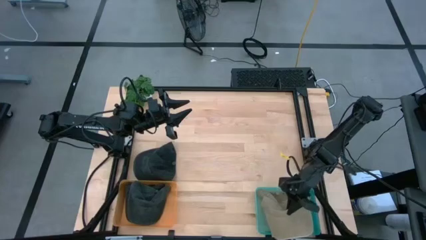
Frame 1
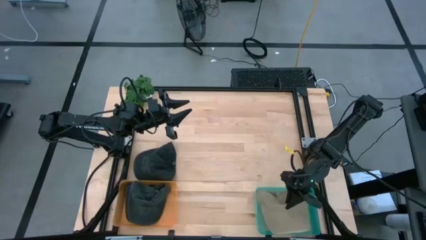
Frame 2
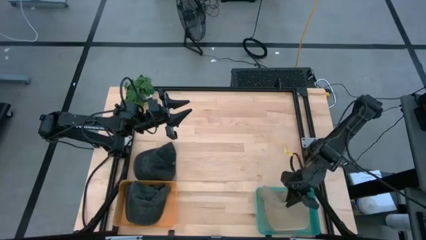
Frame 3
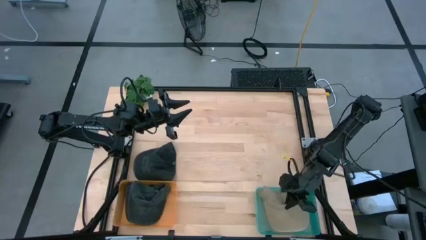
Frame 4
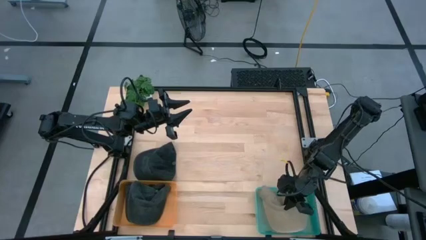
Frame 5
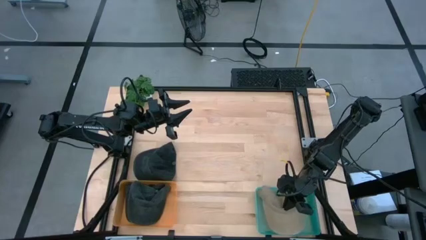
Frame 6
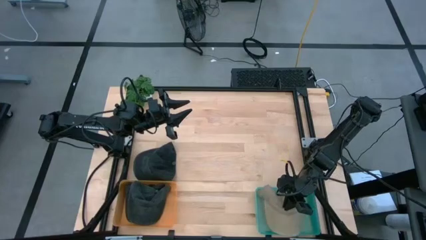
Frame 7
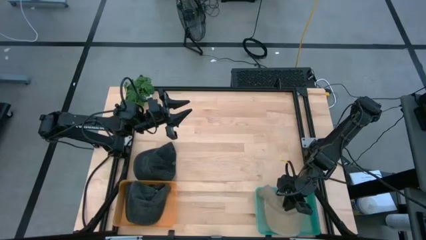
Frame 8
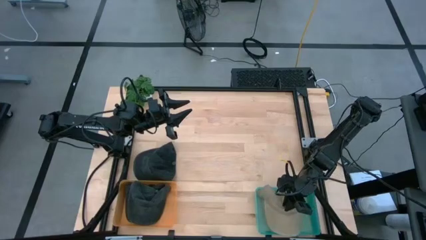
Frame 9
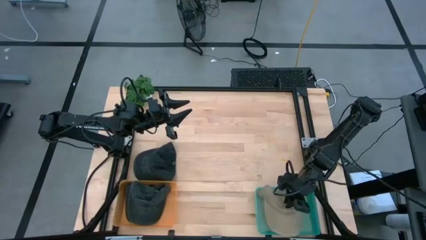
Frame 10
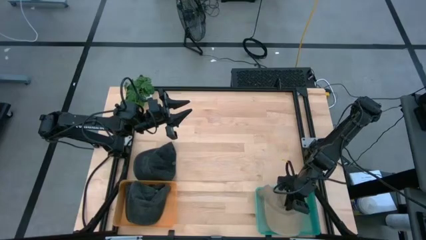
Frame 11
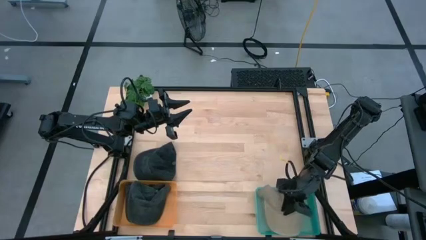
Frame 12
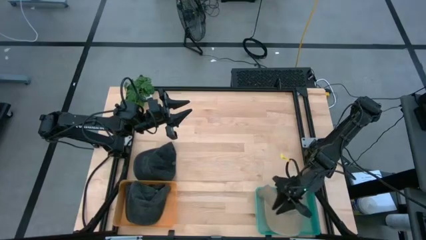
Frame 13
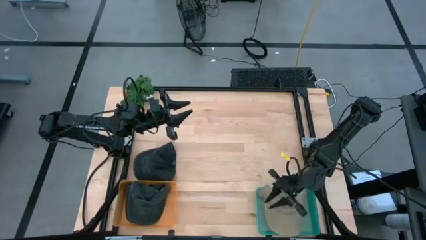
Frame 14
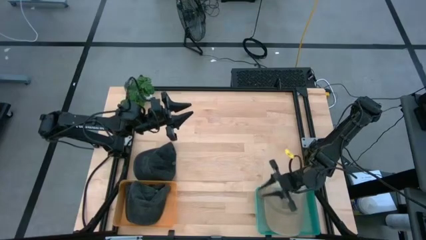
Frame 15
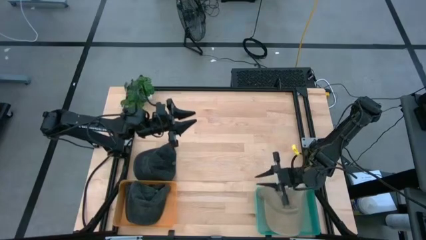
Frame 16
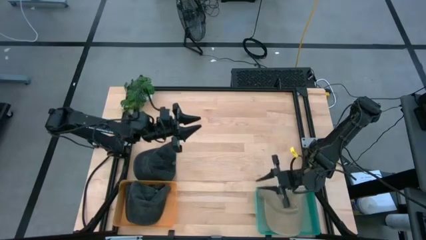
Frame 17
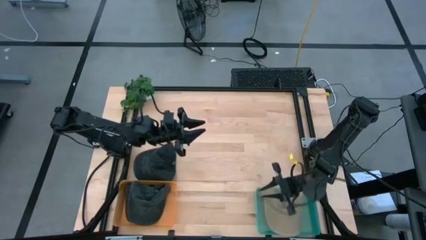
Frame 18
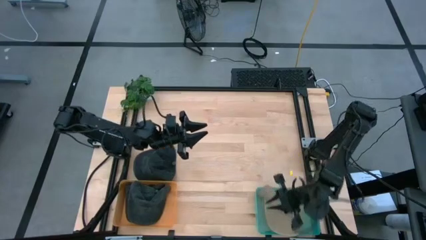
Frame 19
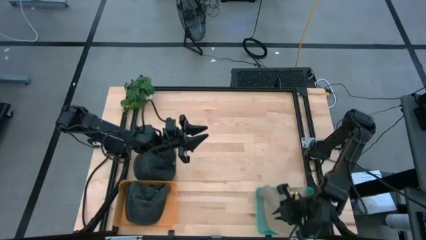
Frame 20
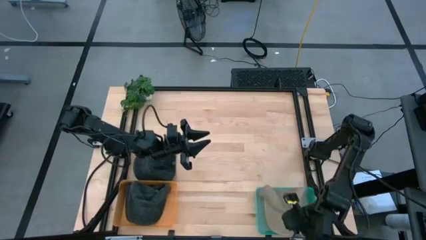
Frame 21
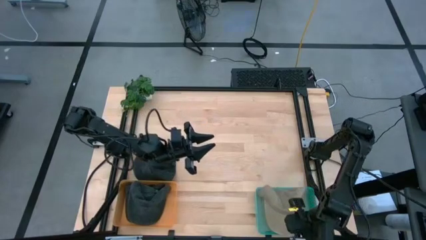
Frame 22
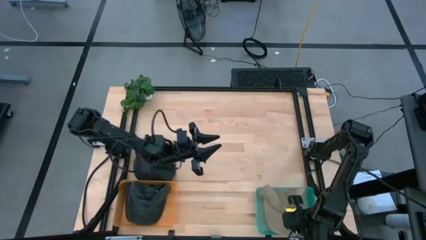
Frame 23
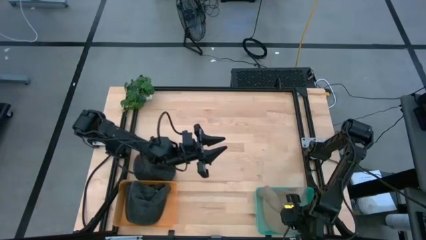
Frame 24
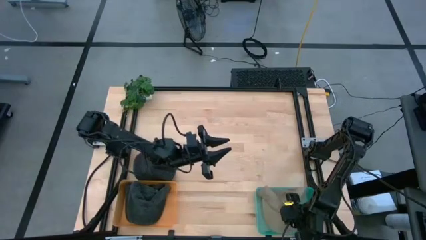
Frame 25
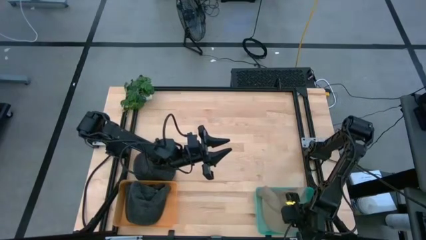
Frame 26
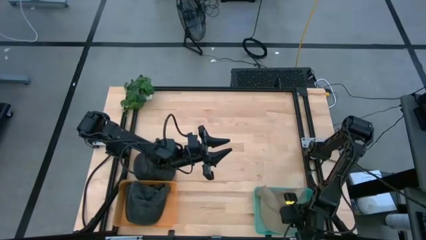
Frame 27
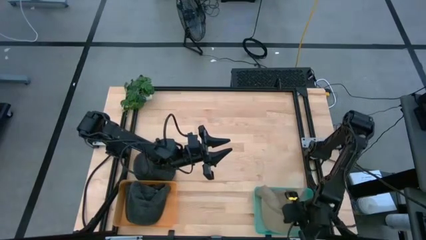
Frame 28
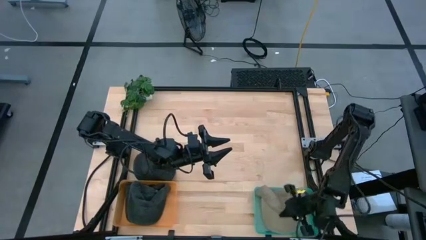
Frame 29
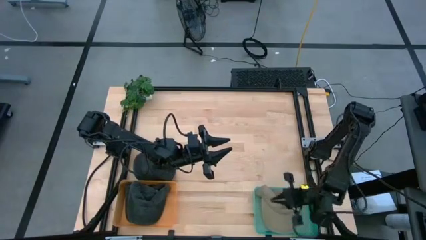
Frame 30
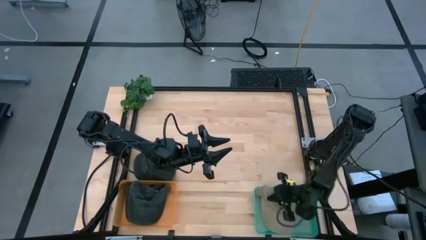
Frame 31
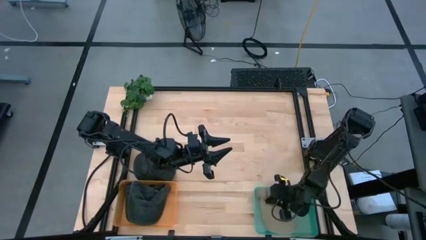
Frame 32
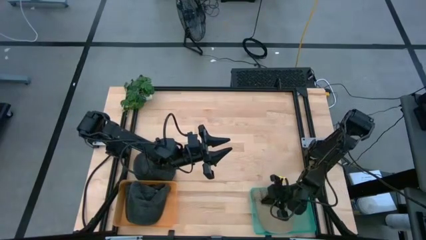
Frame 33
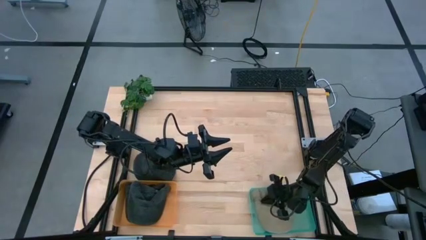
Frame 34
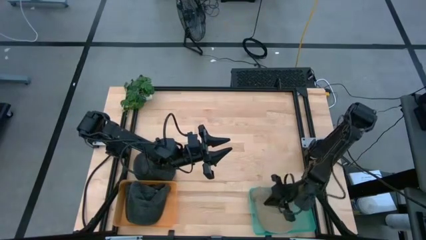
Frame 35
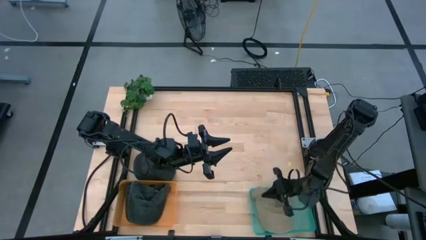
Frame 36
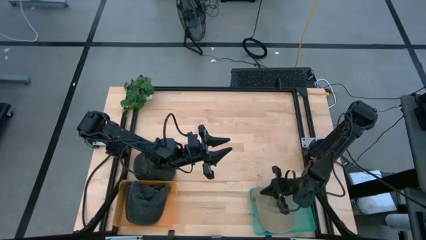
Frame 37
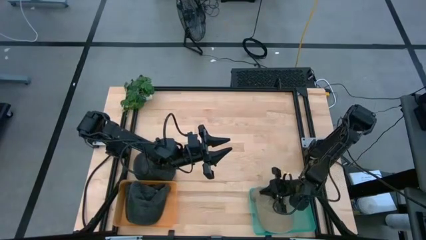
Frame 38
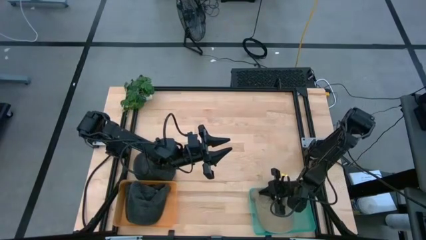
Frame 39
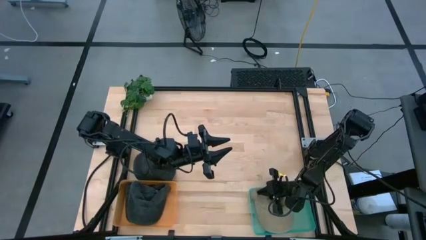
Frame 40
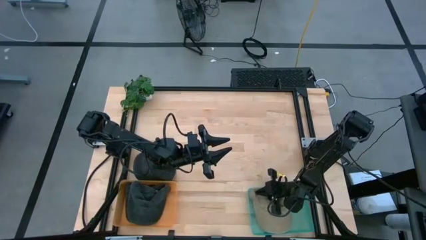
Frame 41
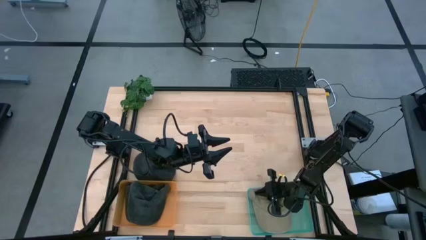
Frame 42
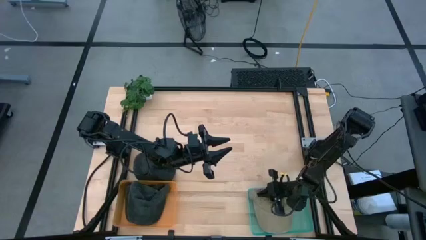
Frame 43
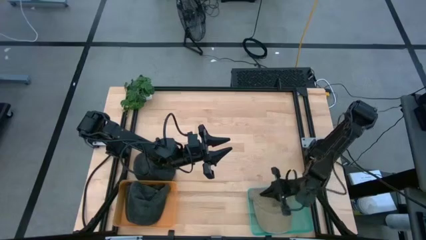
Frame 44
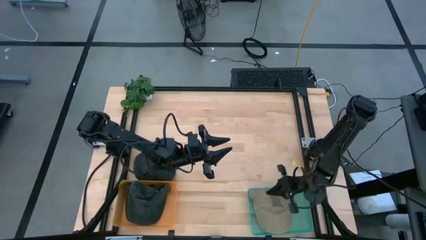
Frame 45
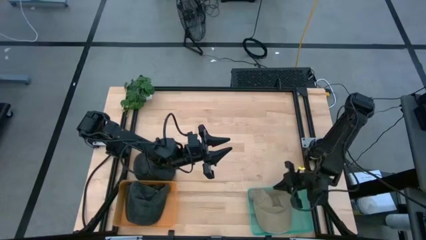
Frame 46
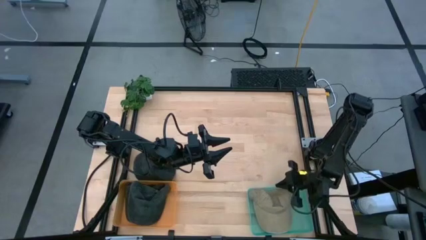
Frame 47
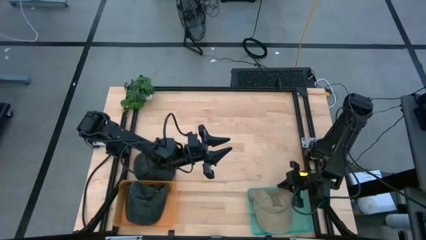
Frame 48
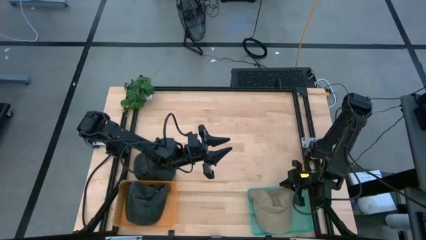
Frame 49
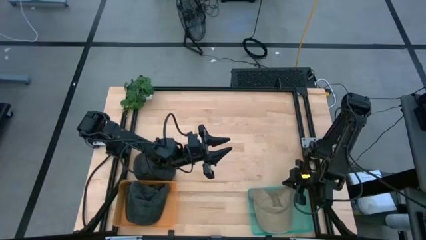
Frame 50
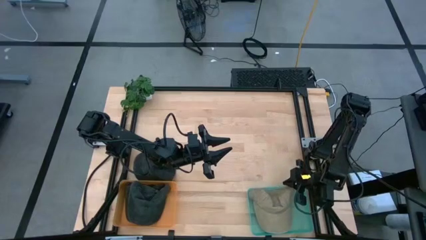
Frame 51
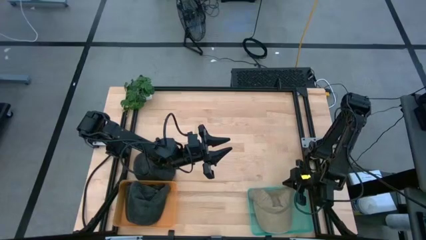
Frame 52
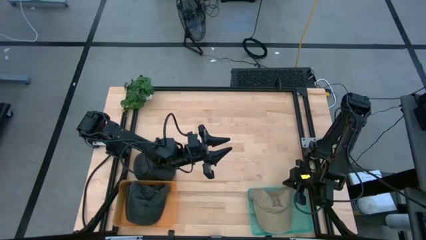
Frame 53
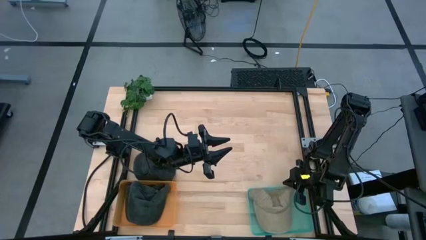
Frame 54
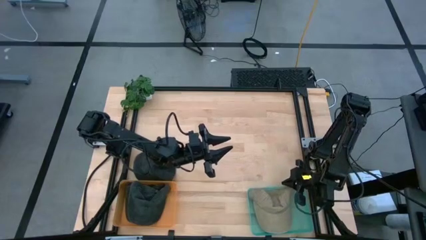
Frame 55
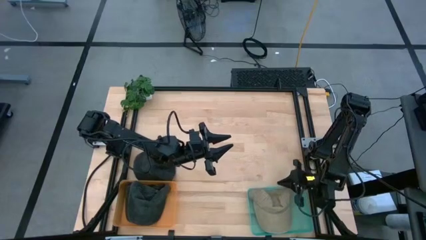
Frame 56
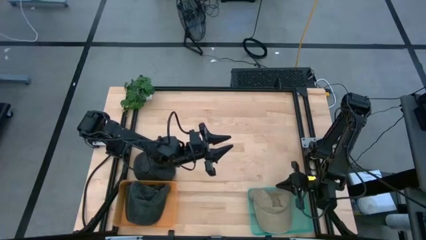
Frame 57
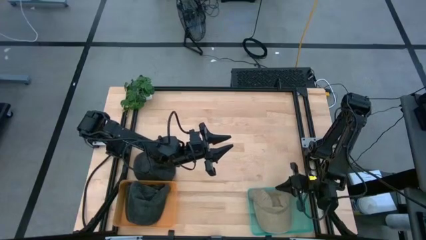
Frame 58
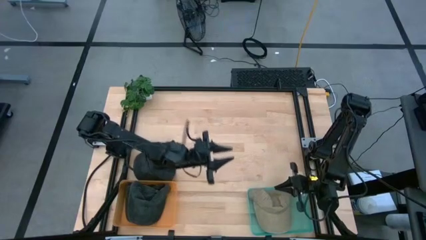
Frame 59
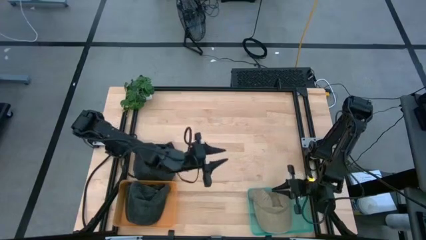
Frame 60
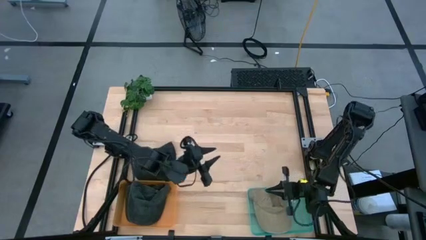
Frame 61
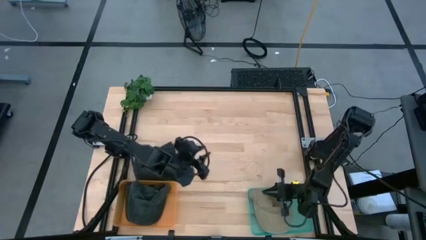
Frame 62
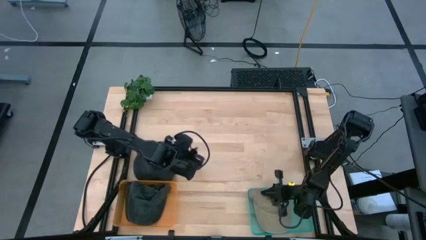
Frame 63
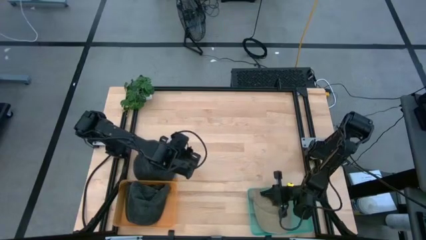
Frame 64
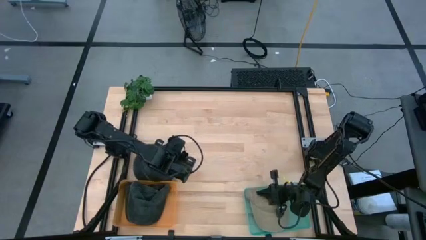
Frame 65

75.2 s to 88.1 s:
Task: Pick & Place hat
Put the brown cap into the blue bin

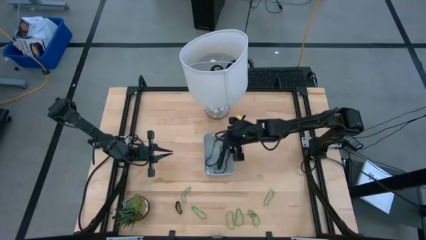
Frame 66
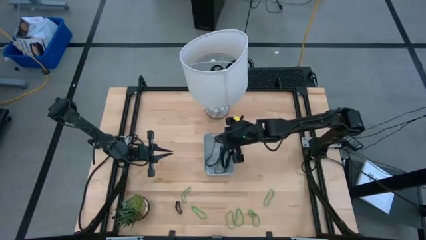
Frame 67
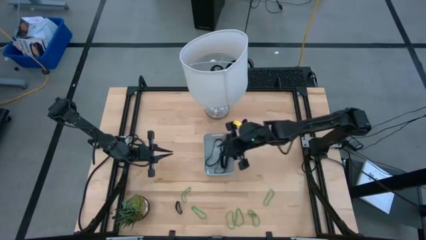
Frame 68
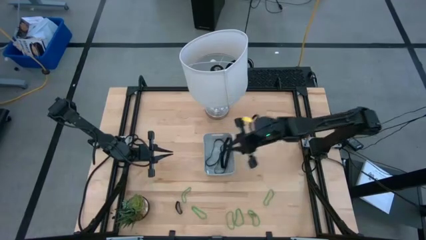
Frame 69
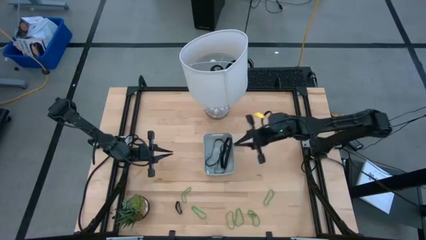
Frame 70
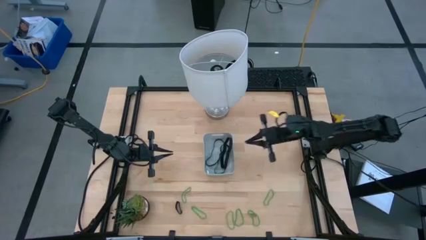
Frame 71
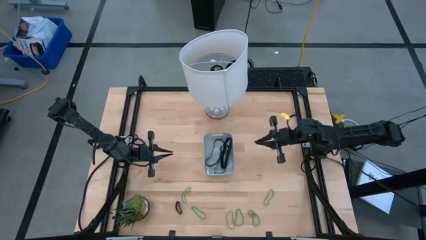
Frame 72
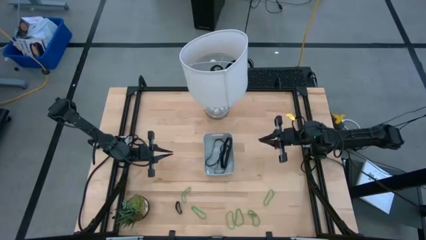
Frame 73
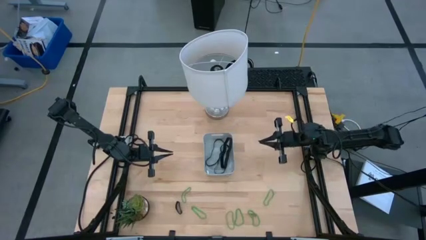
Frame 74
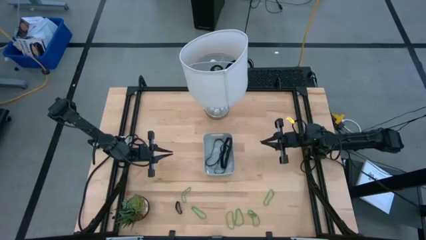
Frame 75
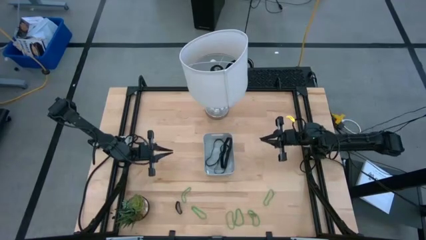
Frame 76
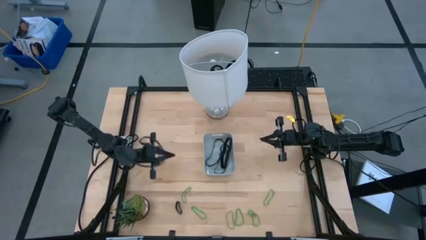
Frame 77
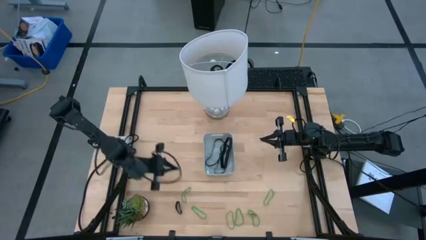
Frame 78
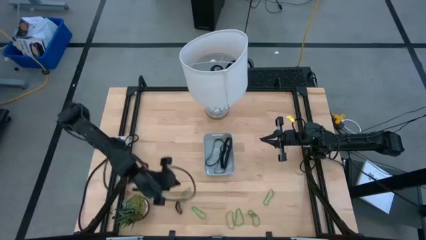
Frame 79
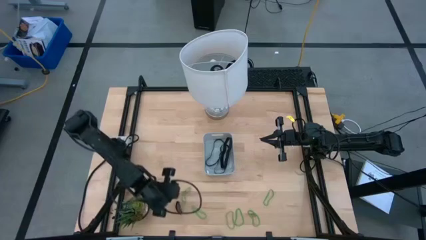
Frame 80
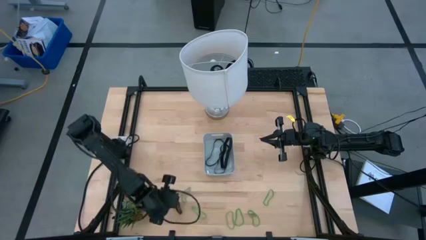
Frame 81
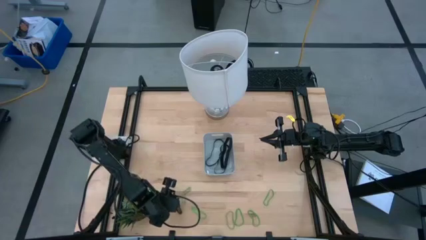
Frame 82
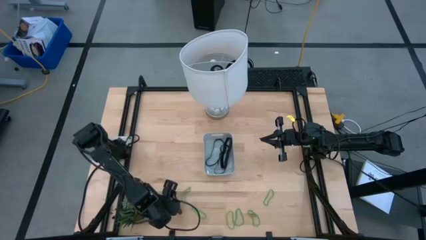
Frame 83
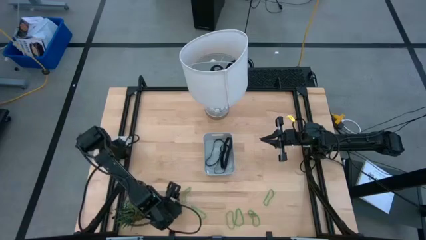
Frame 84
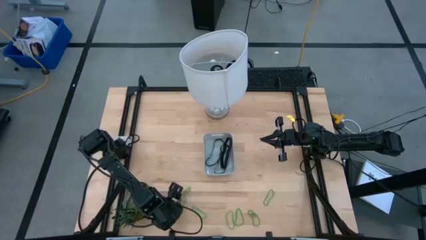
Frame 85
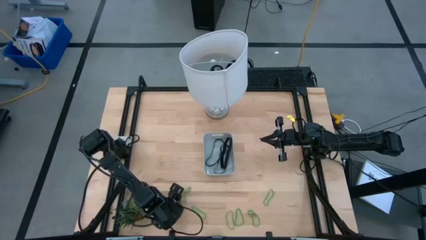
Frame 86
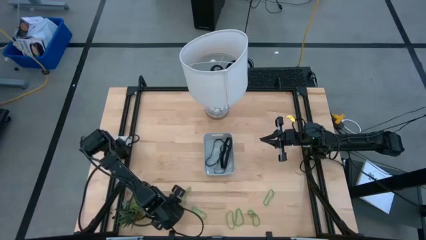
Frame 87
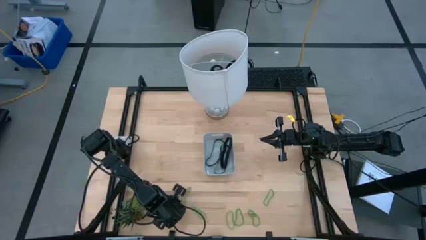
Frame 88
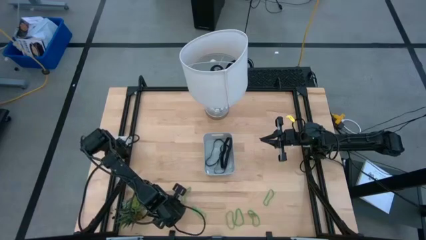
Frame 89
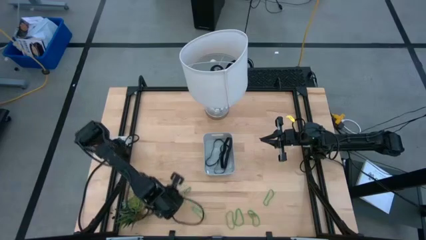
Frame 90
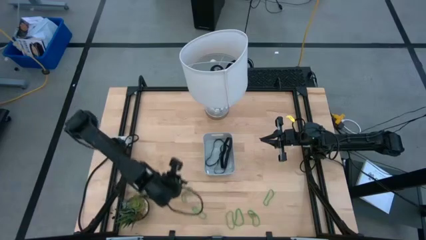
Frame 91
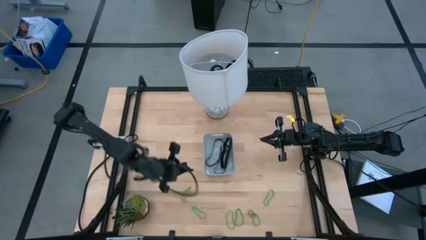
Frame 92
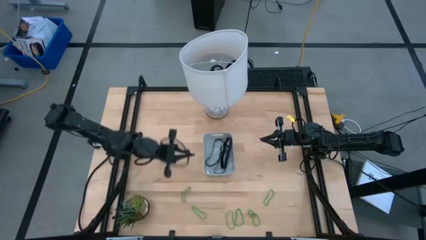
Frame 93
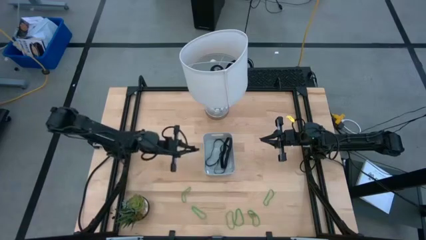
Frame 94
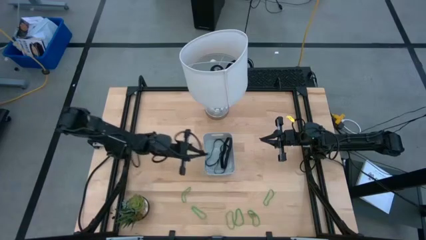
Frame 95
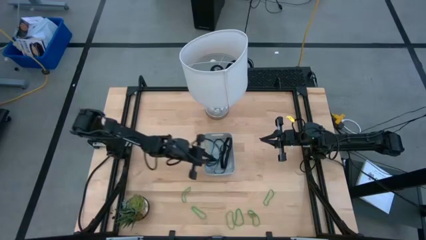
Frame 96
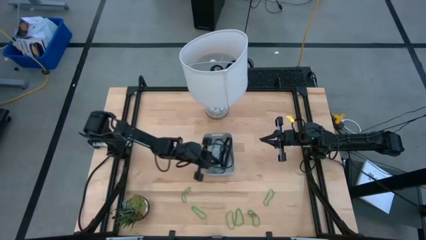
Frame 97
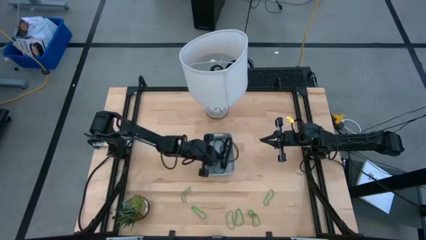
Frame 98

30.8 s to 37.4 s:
Task: Pick and place rubber bands into bin
Put the black rubber band into the gray bin
